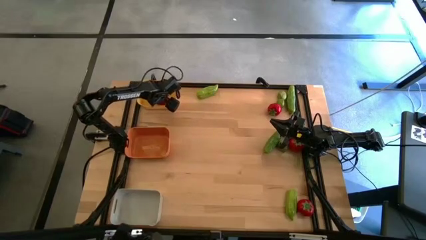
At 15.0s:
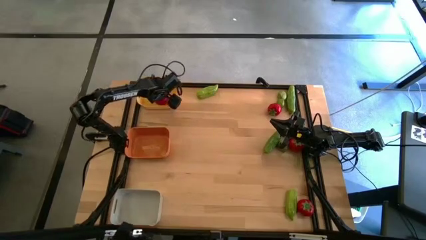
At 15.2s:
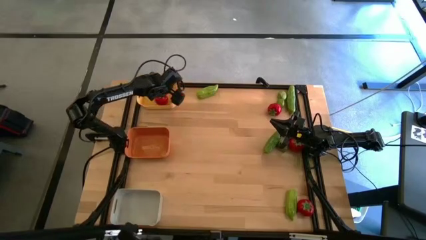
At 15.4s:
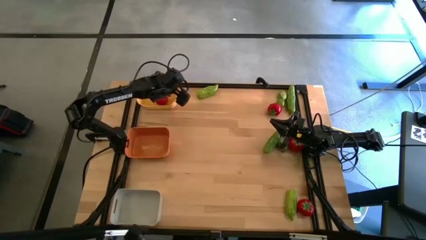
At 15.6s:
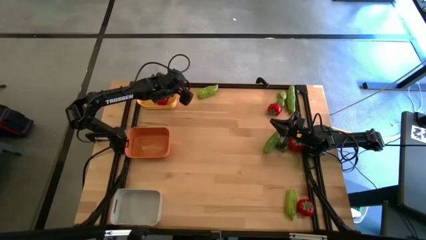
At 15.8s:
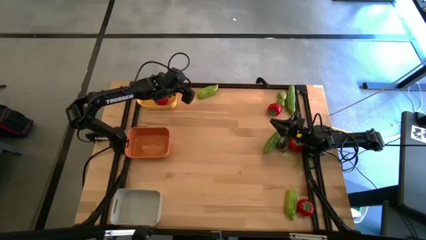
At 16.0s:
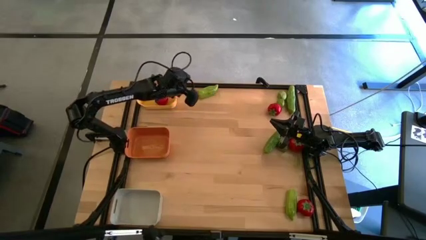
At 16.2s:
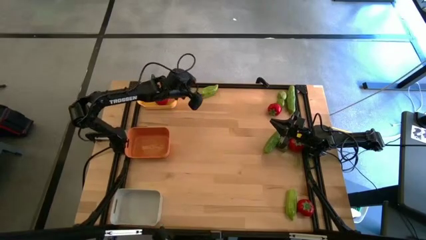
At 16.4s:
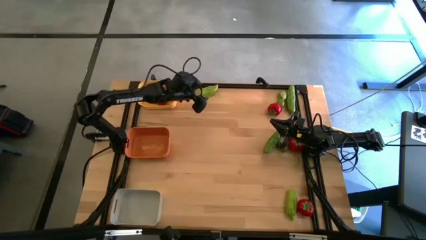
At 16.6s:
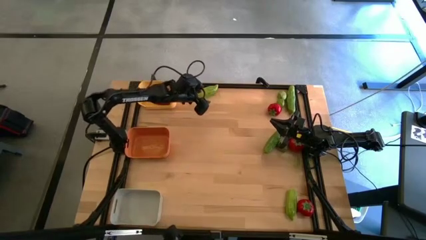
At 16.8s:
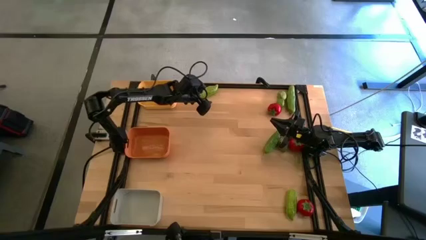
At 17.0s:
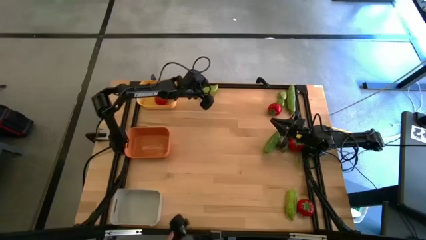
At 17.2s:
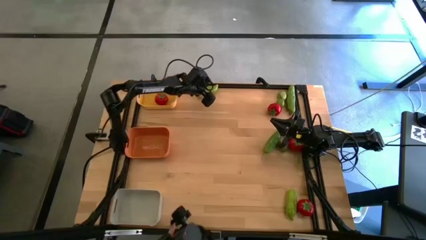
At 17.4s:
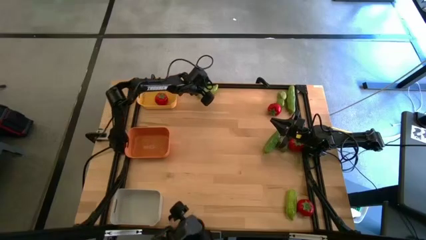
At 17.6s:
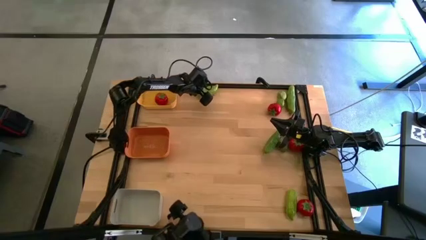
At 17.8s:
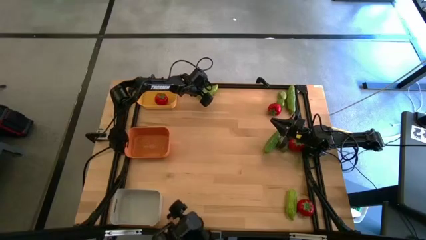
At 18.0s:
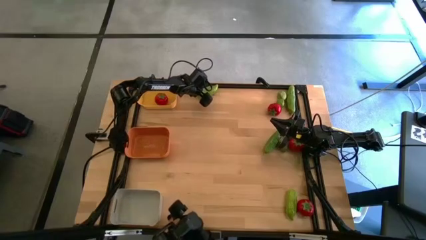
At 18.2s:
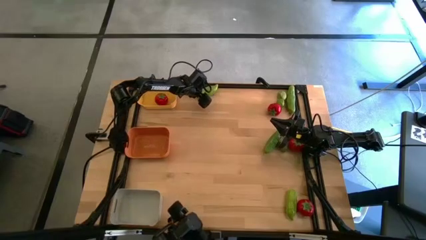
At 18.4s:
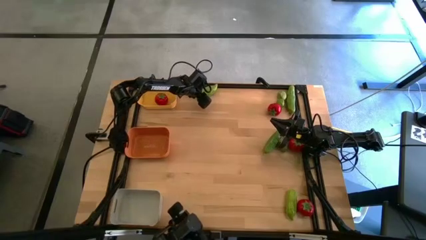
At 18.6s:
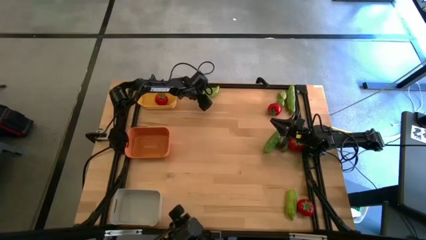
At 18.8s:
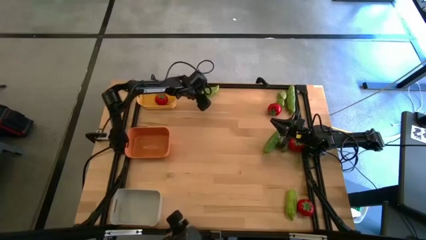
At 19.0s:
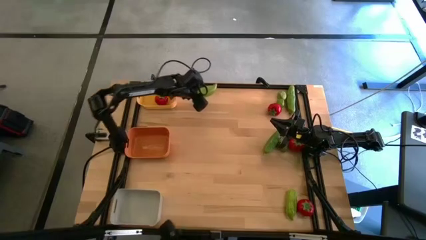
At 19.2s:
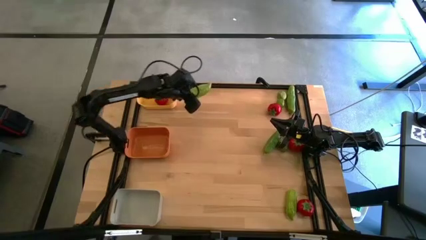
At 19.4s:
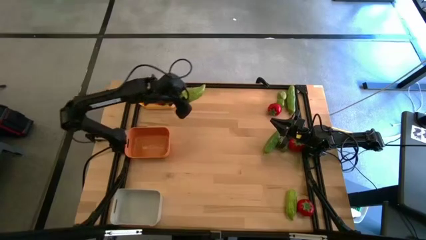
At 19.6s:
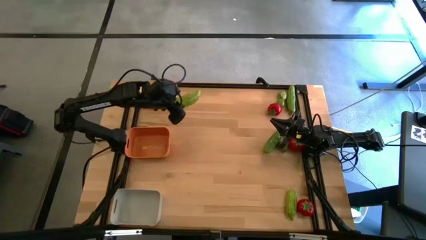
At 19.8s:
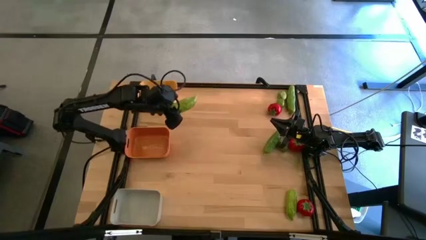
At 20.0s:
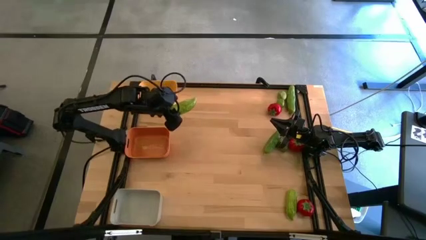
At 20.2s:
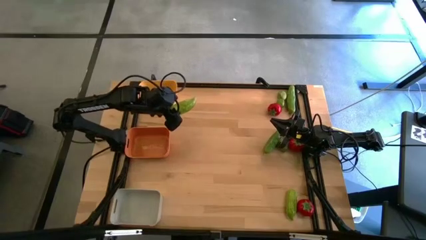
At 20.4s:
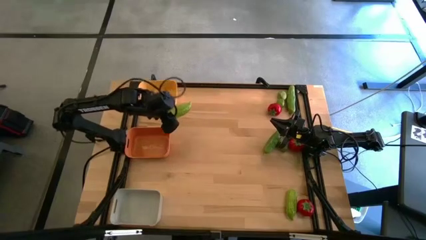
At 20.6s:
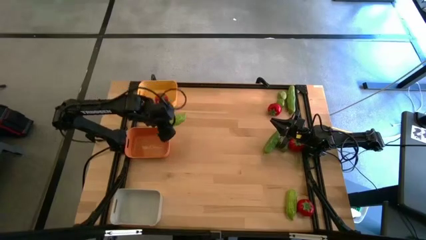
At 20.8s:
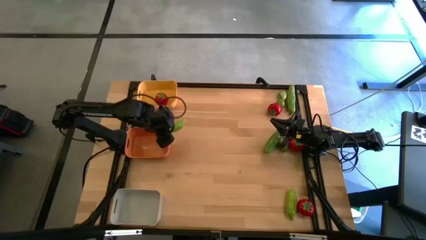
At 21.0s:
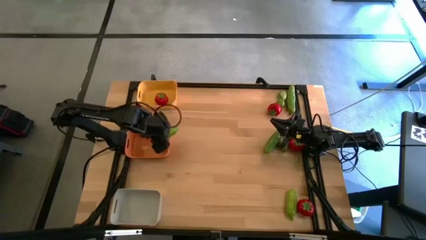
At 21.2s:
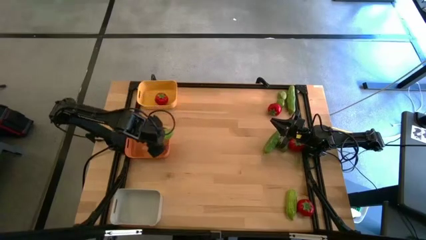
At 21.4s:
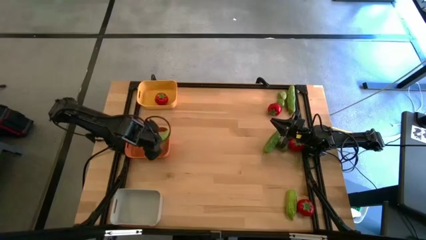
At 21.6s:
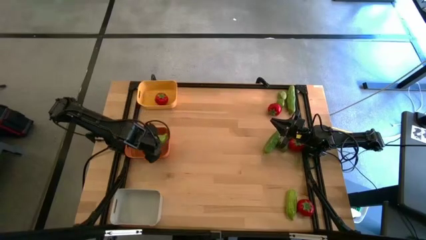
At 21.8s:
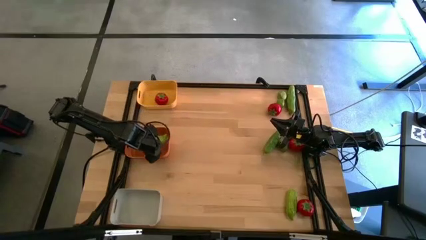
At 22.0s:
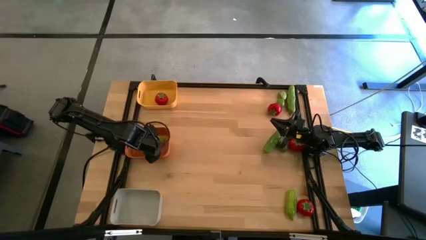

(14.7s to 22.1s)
Task: Sort produce into baskets
Put the cucumber into the orange bin

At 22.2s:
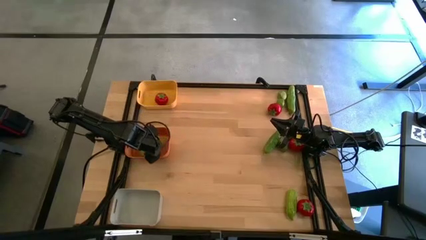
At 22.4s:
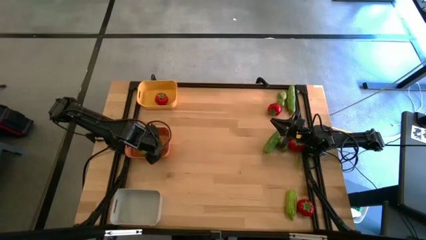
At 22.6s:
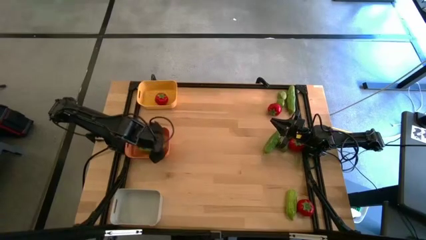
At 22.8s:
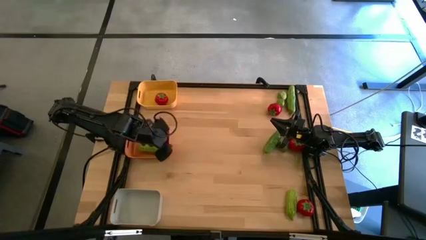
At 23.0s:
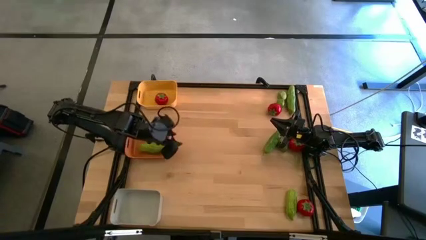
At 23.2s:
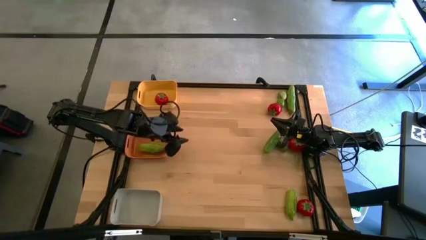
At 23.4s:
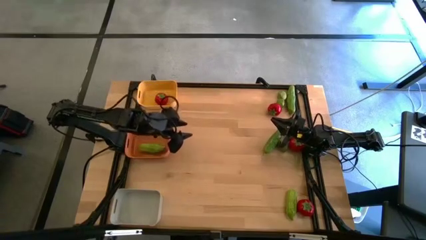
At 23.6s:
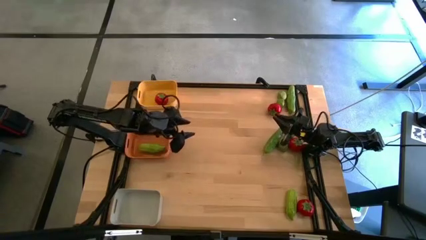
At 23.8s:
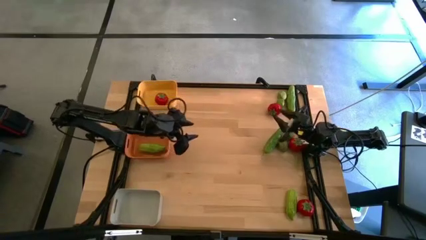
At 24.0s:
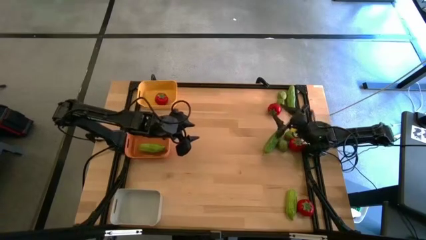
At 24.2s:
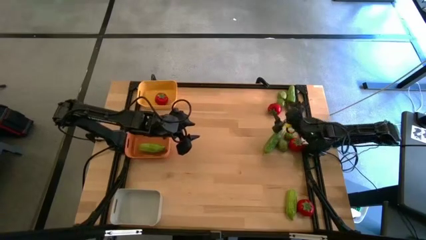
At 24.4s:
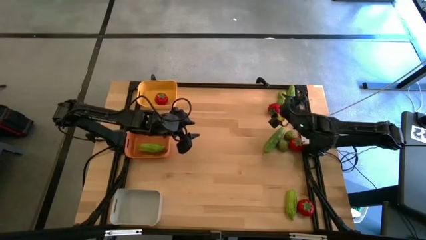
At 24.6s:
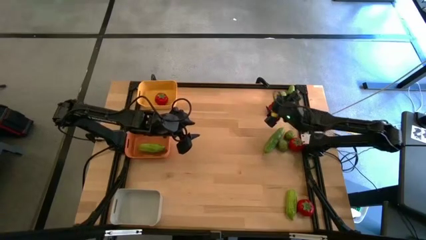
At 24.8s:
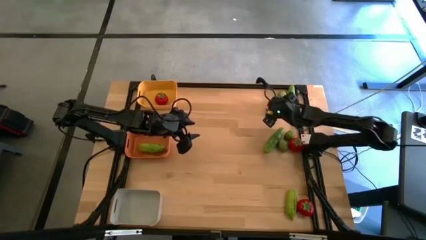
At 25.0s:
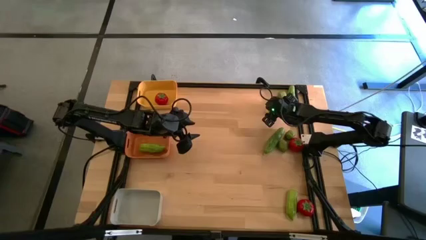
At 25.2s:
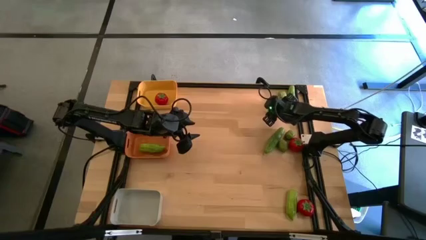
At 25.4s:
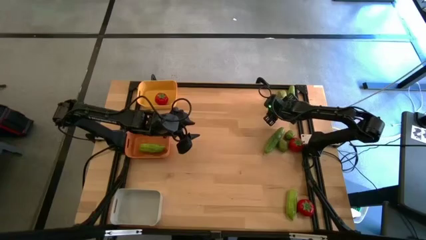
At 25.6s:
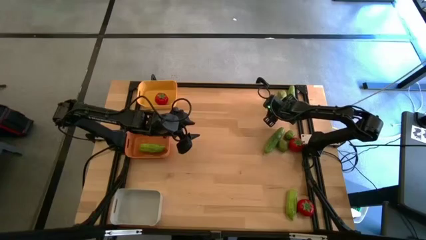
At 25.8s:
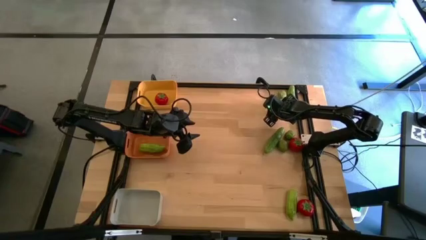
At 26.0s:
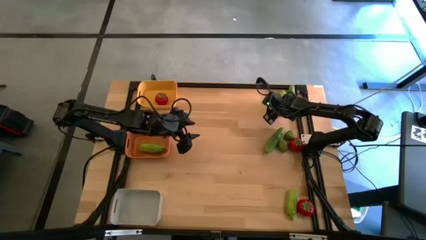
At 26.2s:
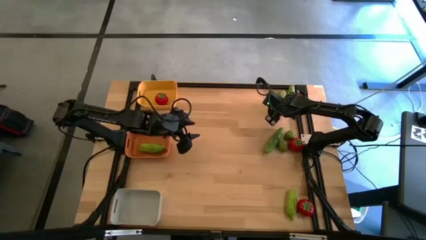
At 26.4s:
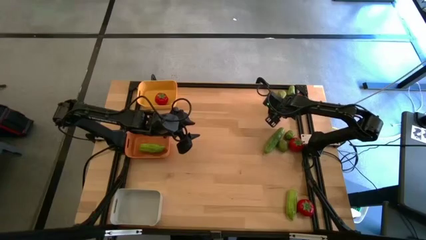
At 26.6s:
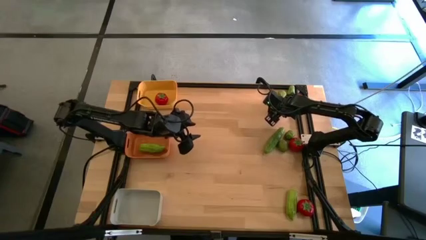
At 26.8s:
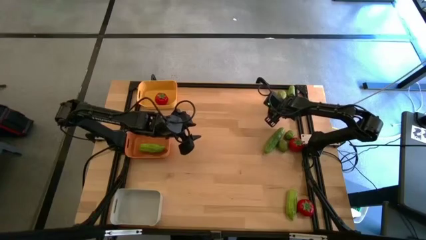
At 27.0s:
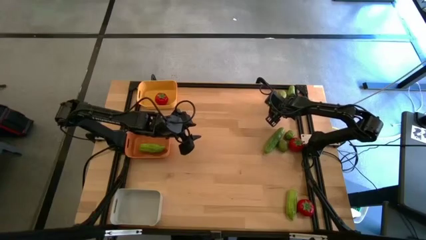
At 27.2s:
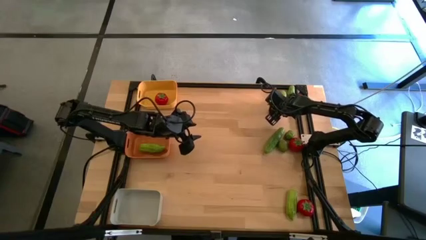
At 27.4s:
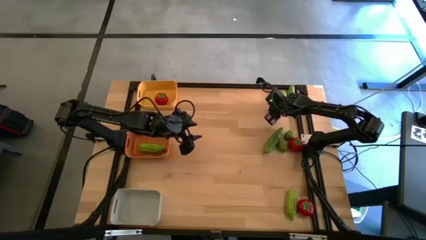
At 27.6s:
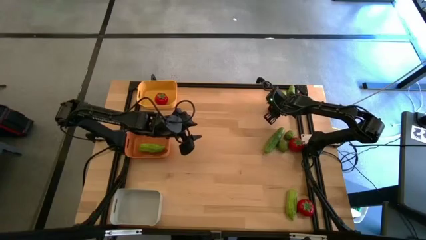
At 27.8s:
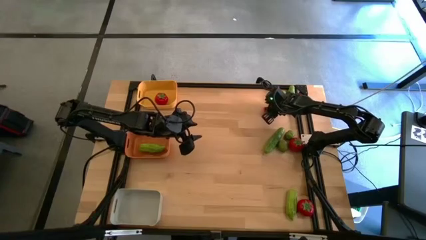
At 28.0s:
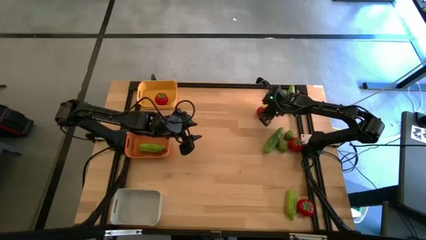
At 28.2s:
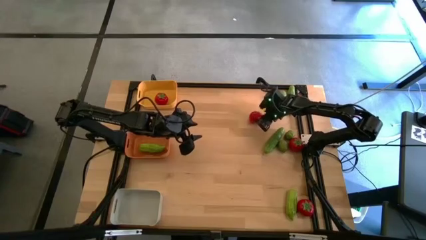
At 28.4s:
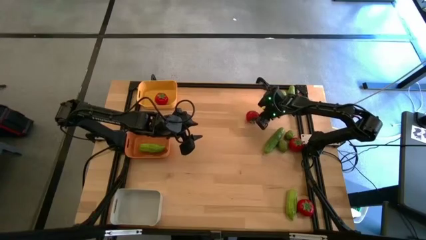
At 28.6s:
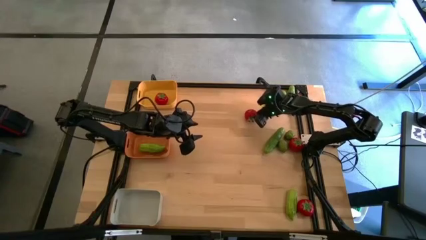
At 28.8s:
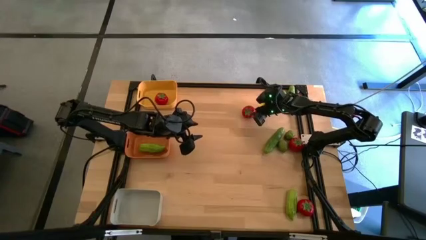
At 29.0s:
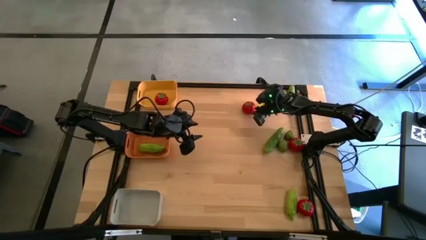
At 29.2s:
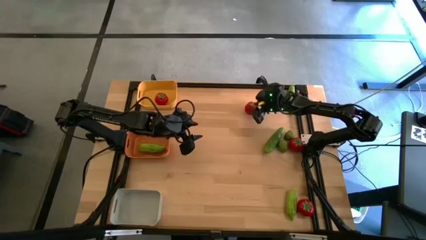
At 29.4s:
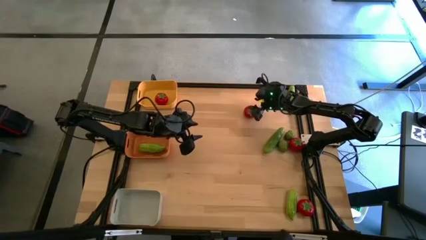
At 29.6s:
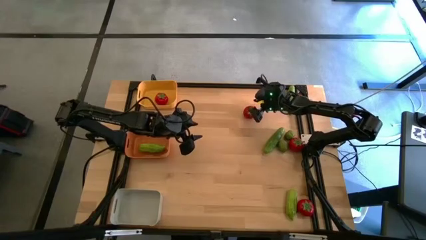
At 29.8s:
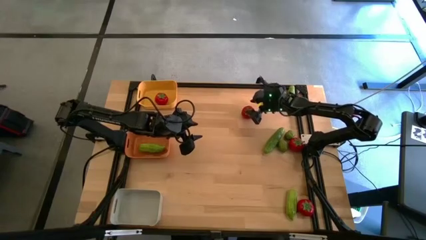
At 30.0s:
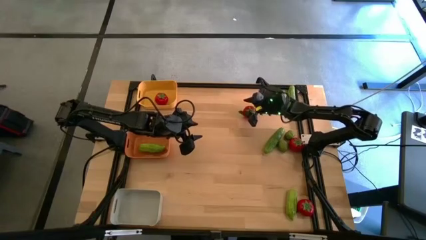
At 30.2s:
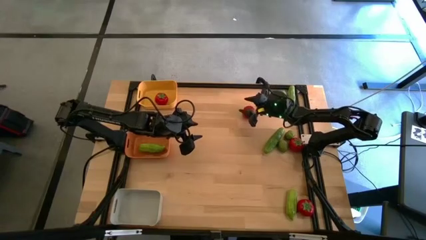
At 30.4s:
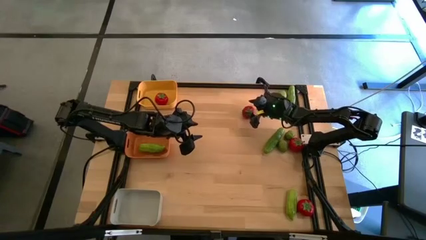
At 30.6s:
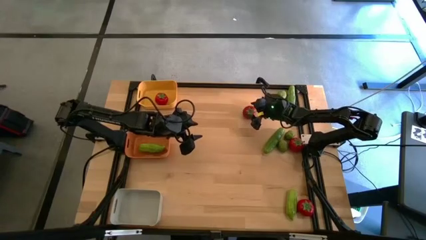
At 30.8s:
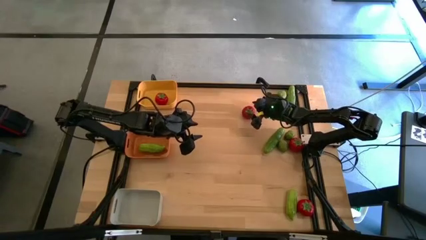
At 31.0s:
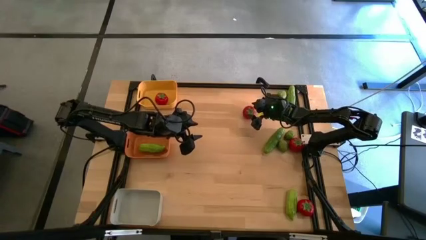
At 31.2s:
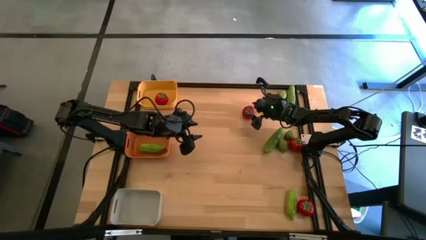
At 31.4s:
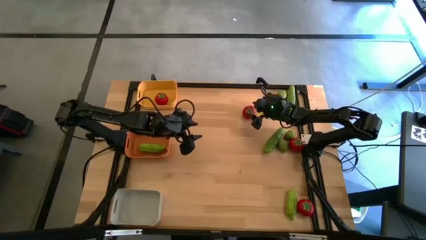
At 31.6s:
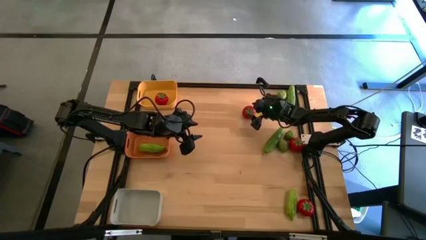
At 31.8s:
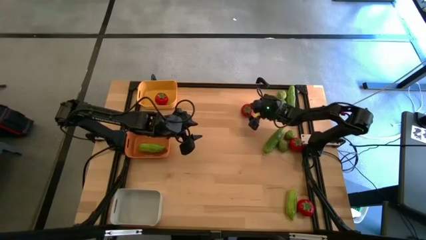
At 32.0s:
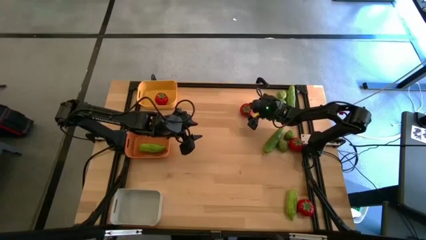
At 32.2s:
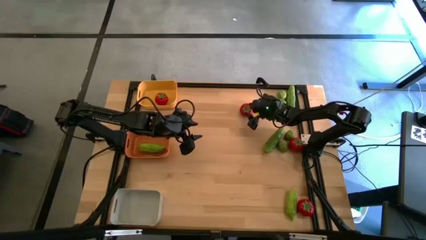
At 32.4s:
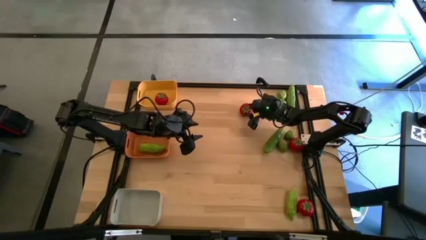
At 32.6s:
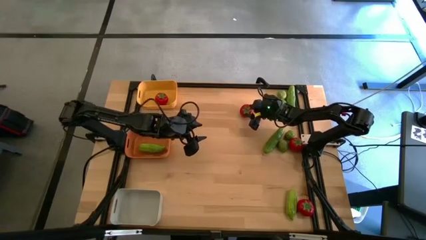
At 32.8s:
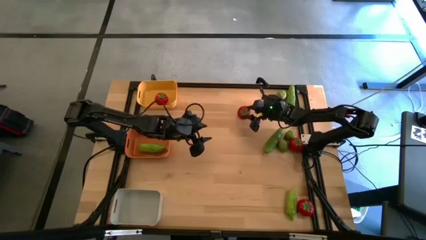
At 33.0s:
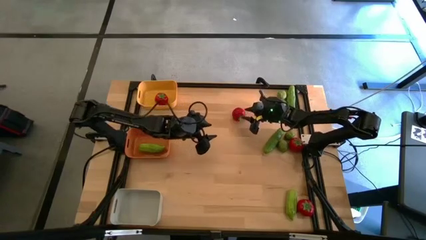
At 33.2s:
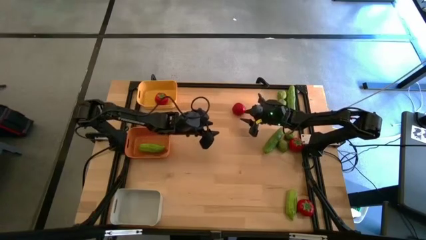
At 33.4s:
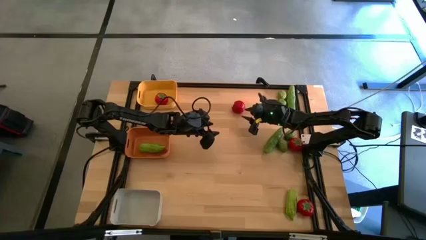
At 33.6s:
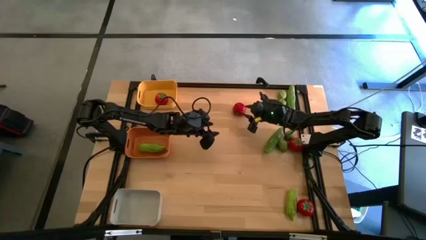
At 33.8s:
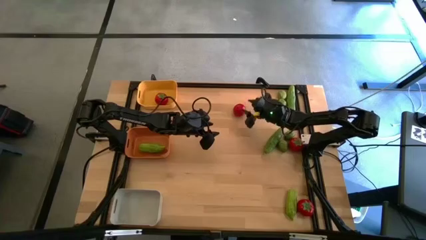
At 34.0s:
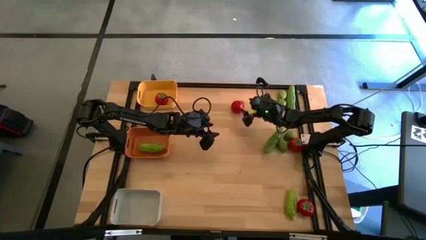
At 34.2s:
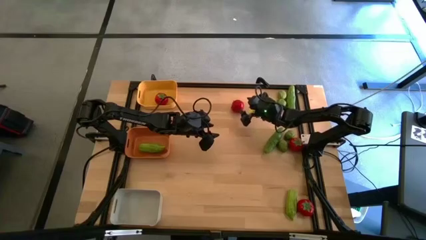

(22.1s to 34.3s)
Put the tomato into the yellow bin
